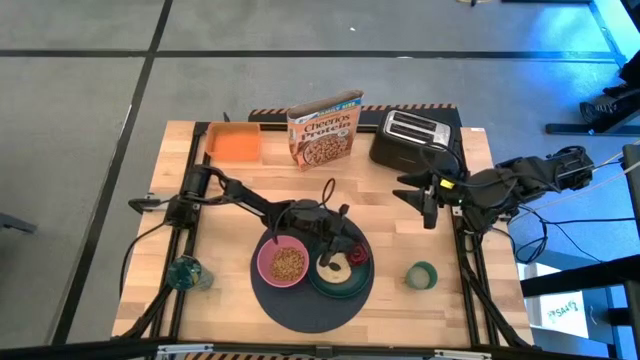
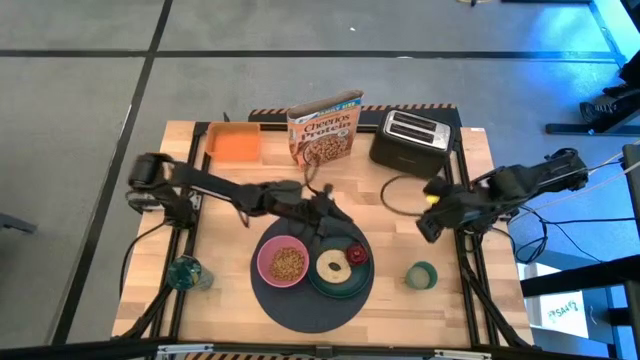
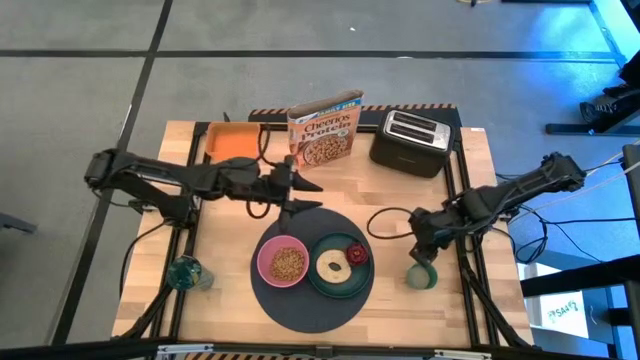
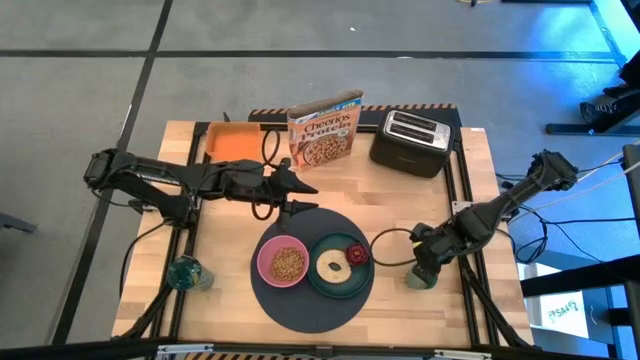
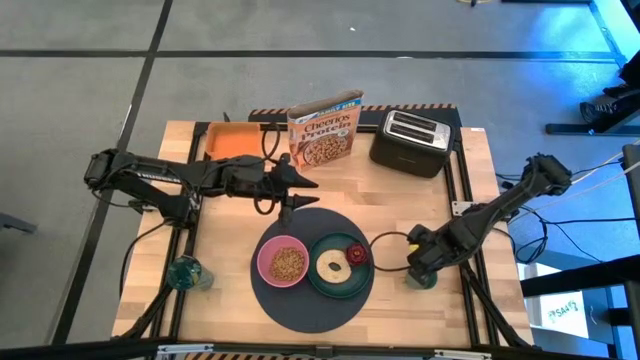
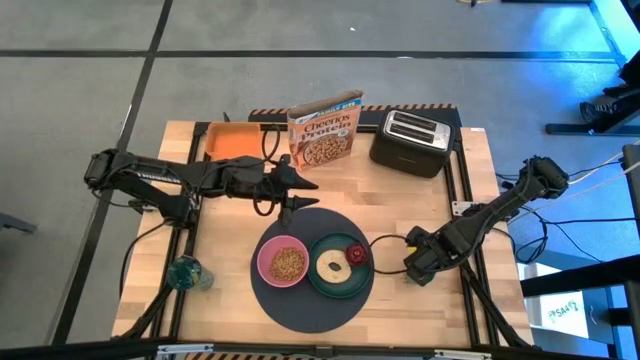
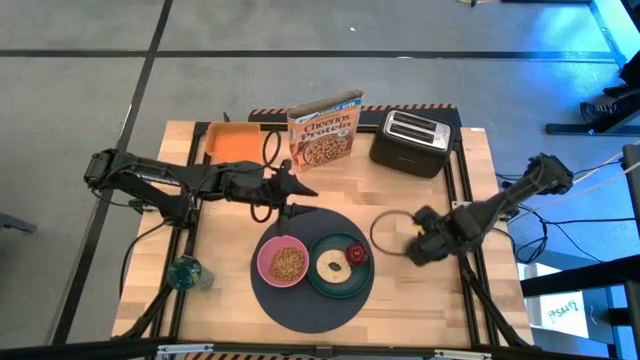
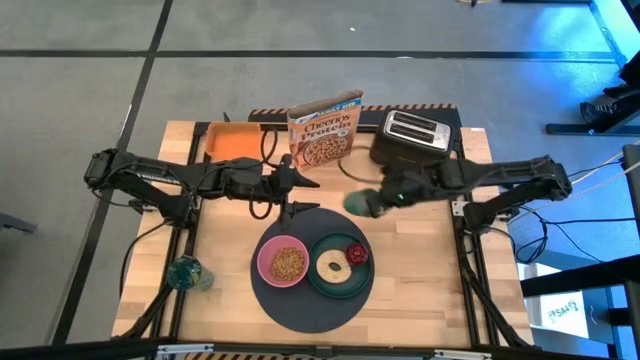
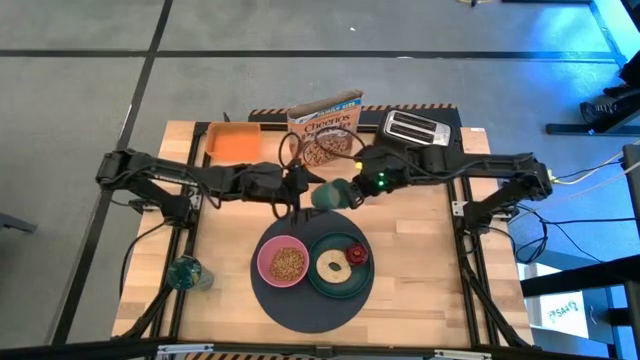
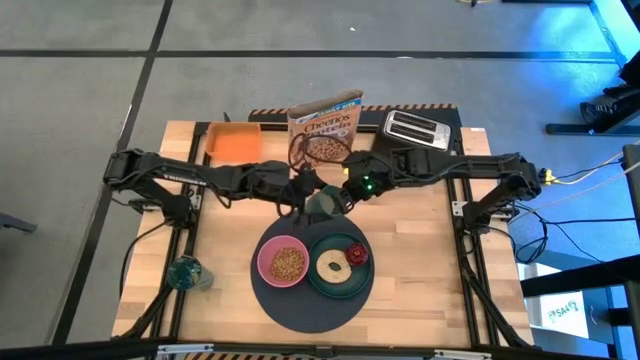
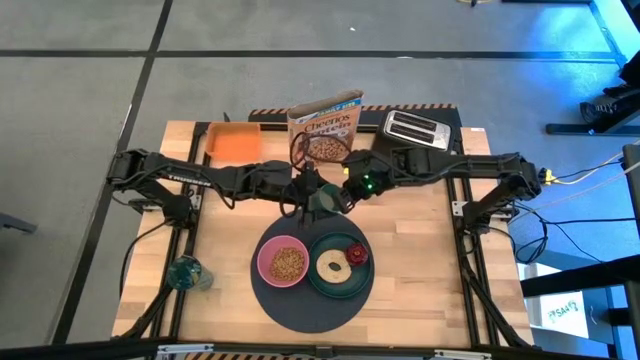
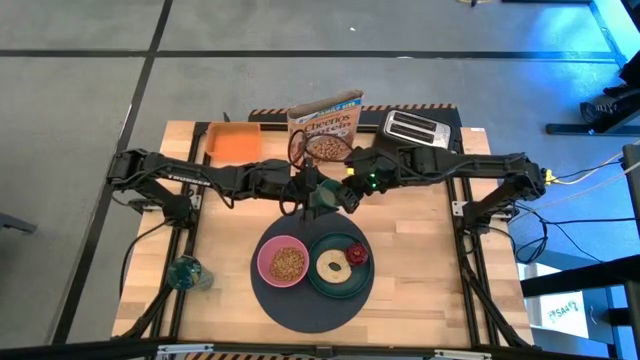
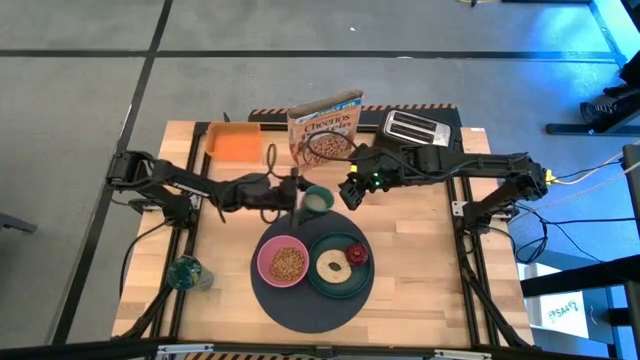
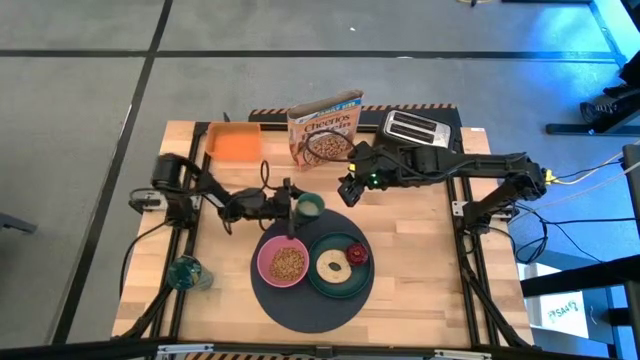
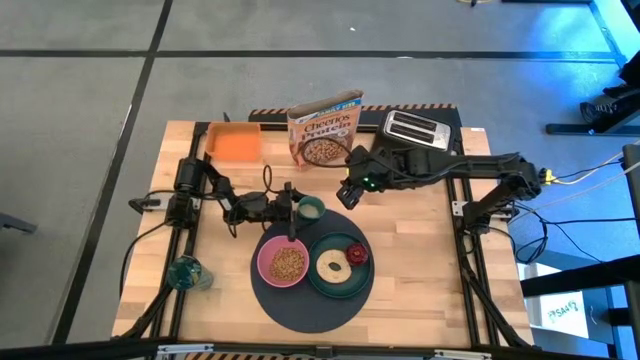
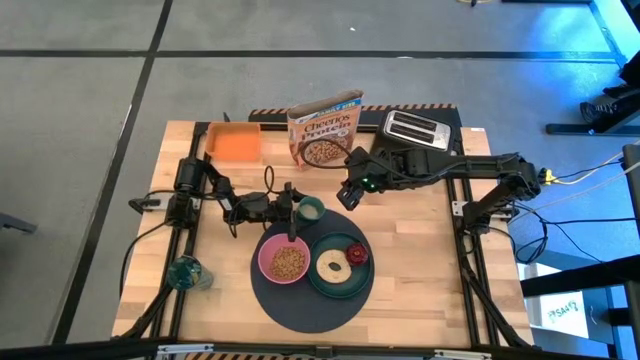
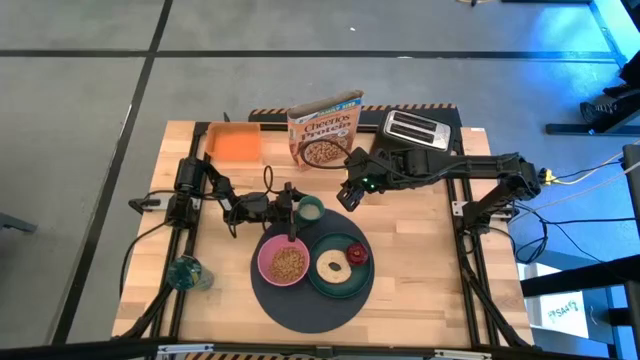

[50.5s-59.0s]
Task: Arrange a breakfast setting
Put the cup on the table mat

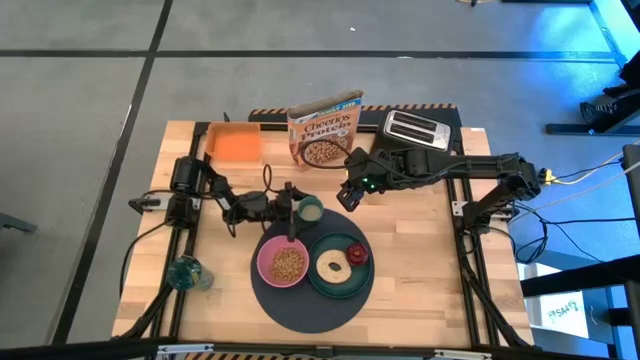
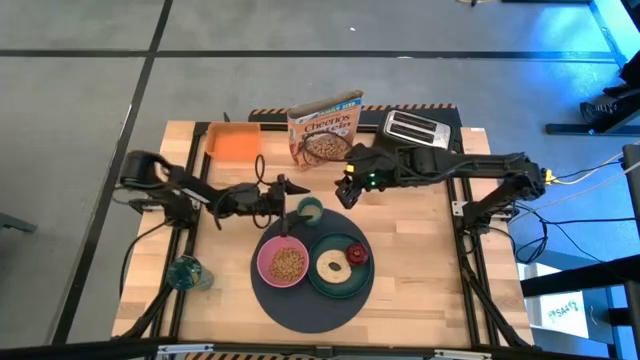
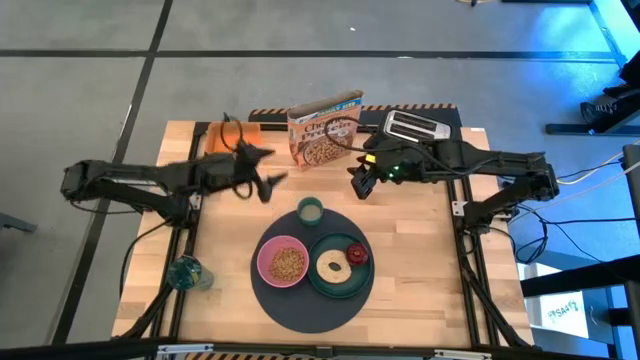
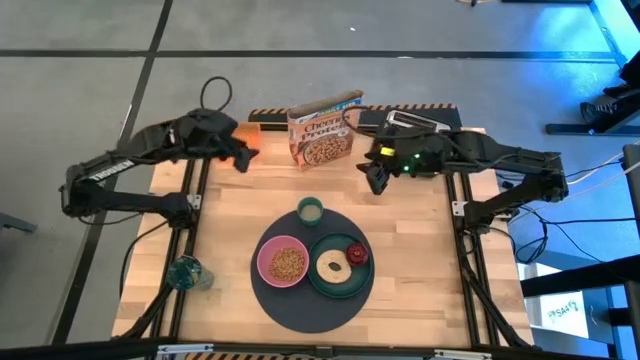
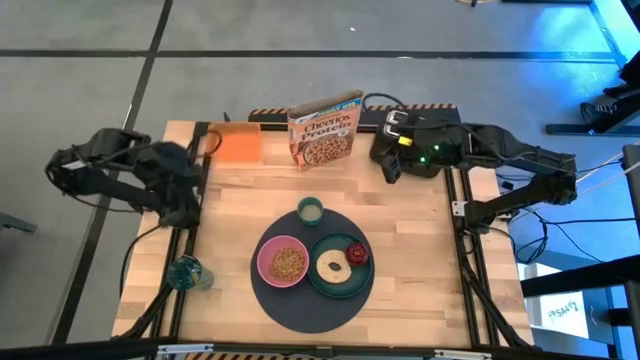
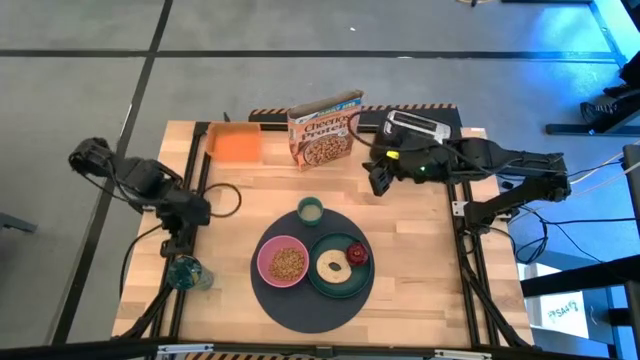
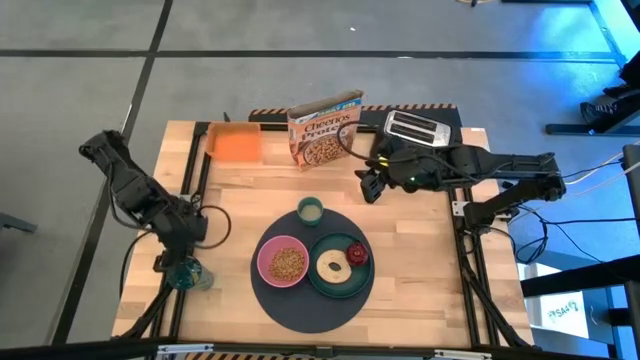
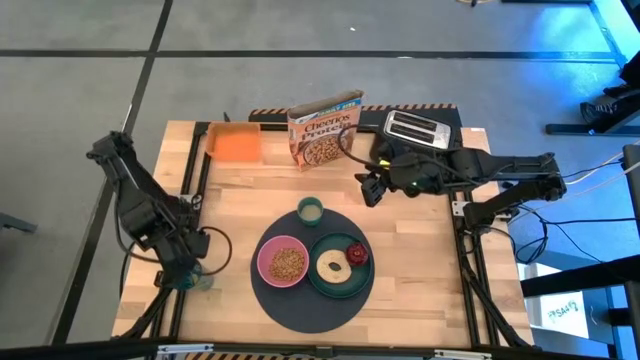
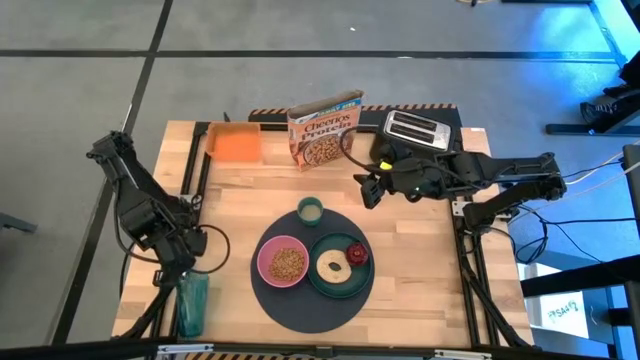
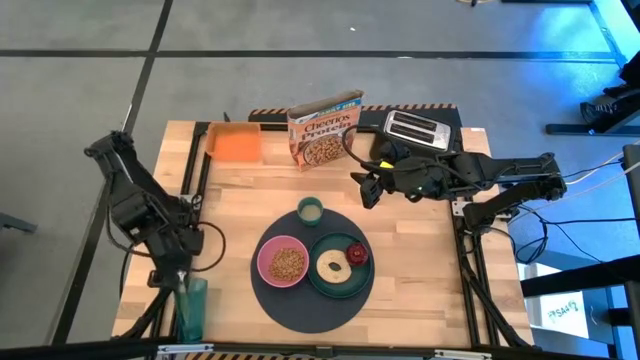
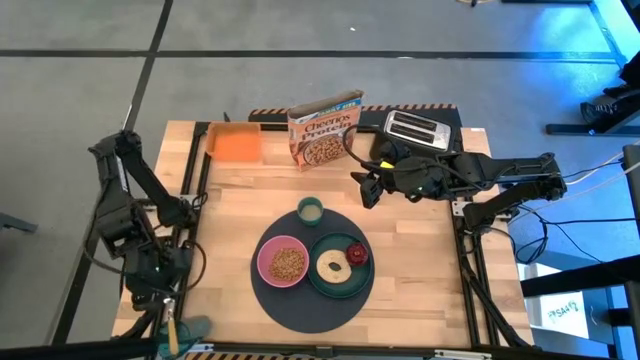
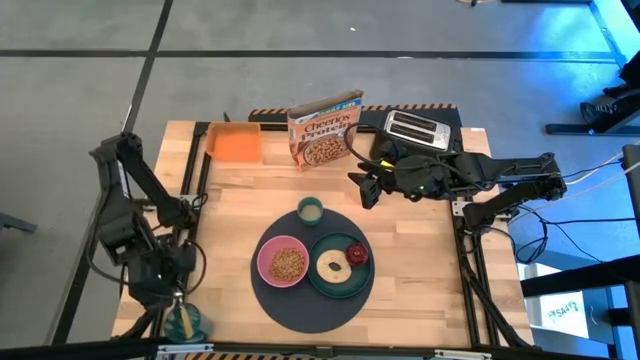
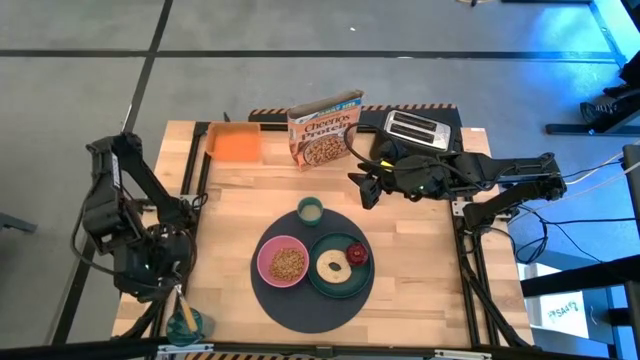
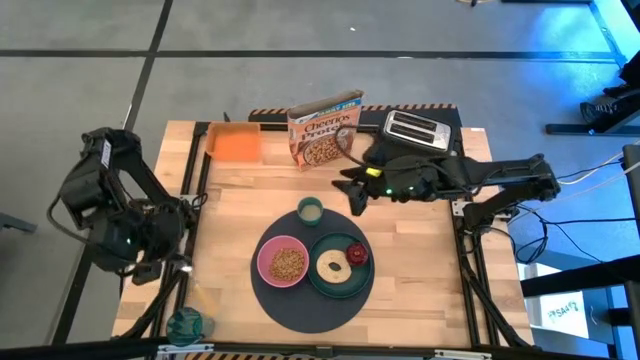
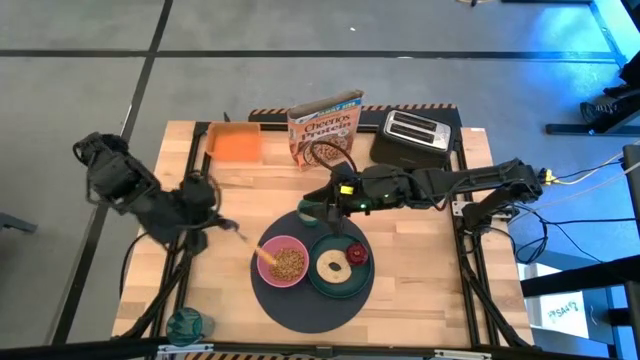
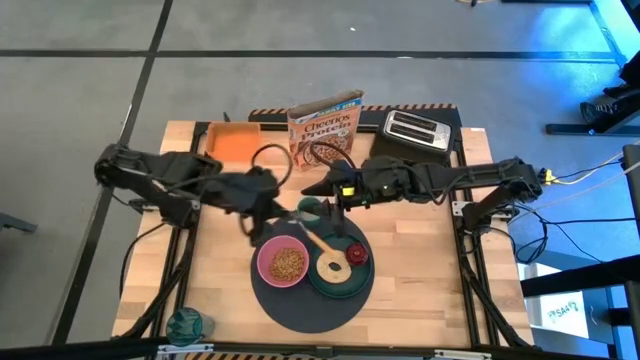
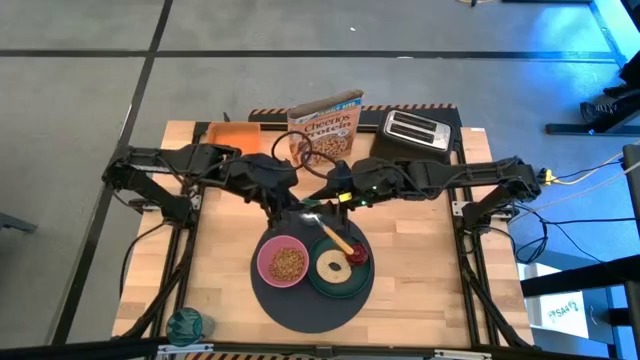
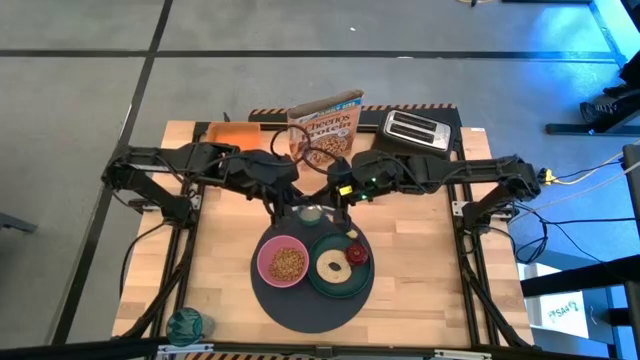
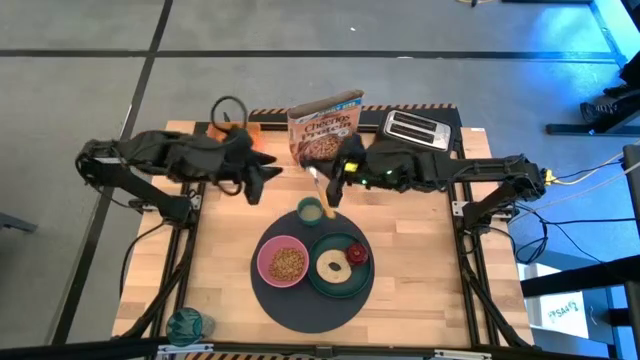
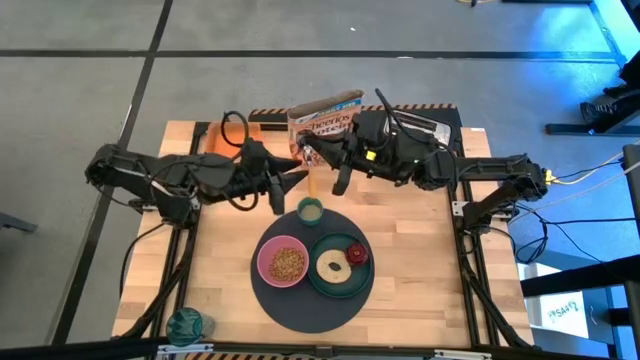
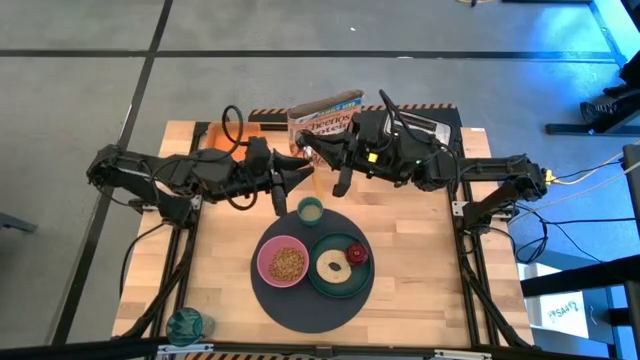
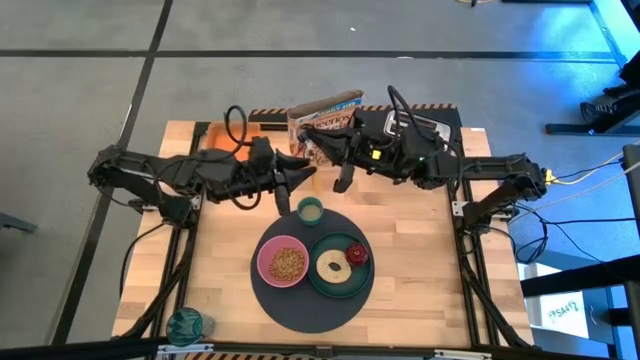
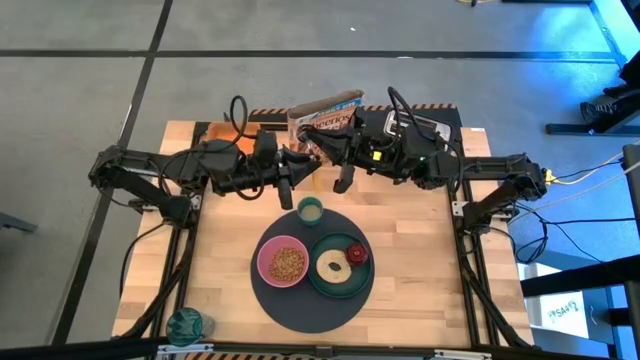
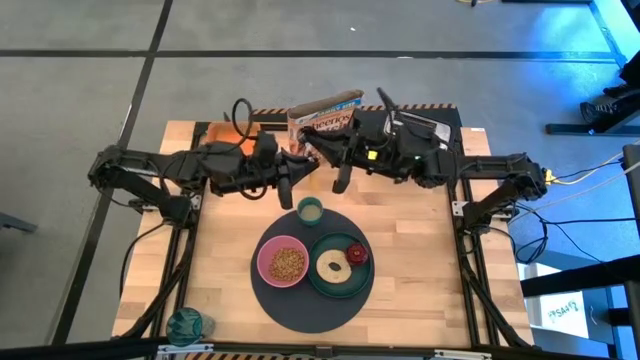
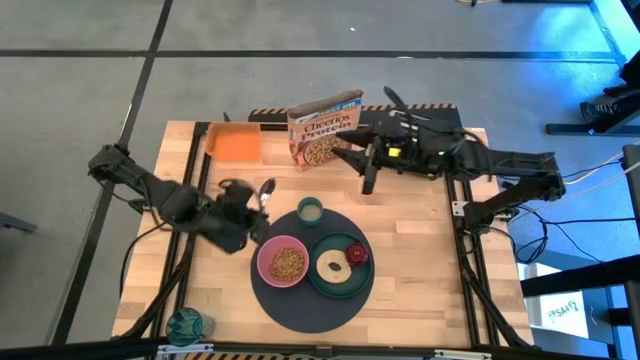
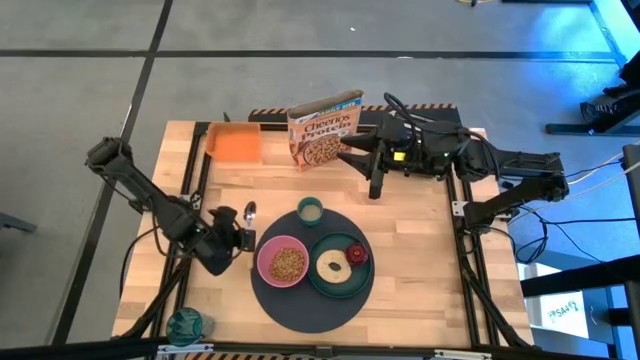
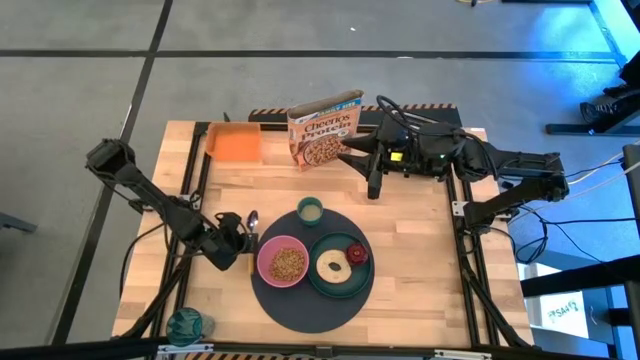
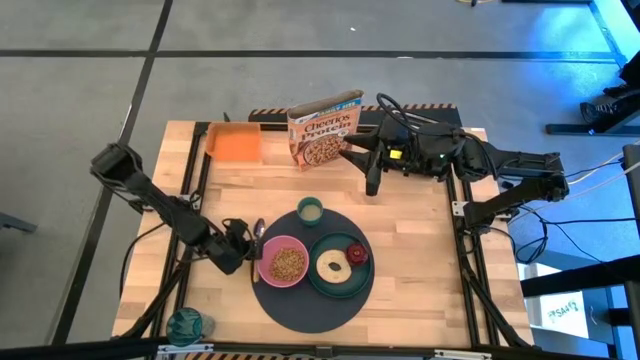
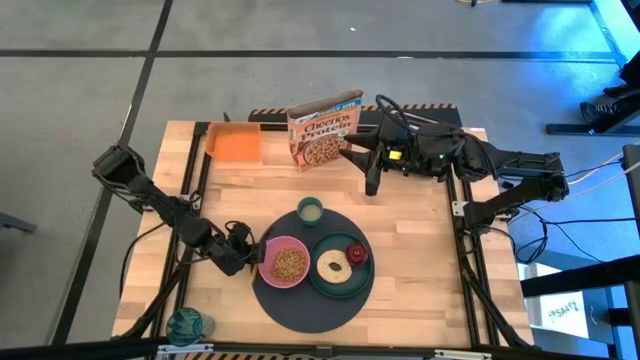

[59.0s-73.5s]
Put the spoon on the table mat to the left of the pink bowl
